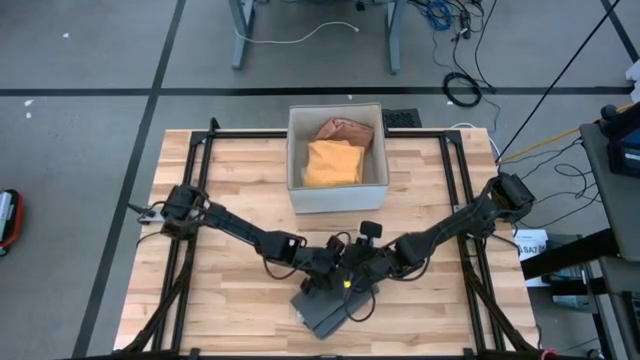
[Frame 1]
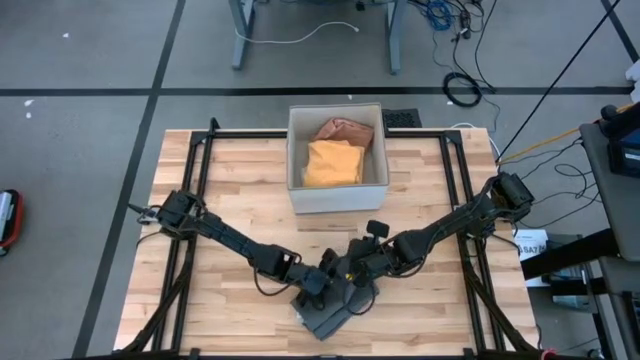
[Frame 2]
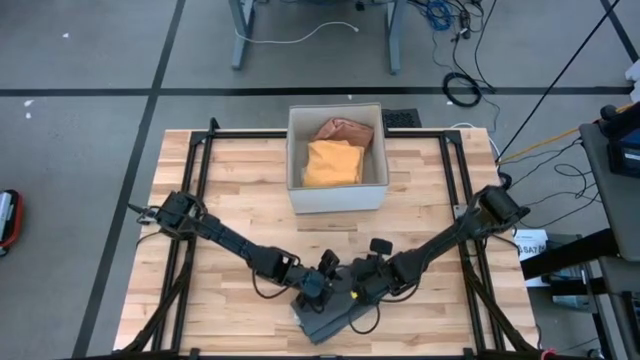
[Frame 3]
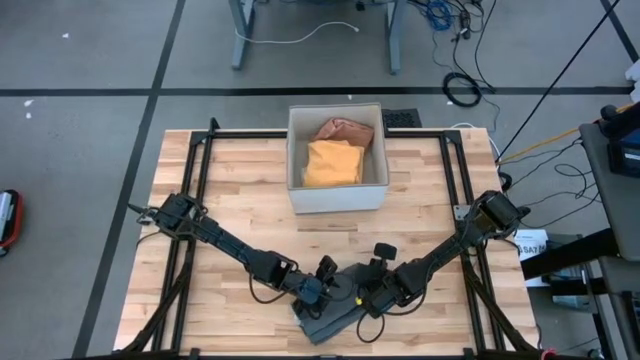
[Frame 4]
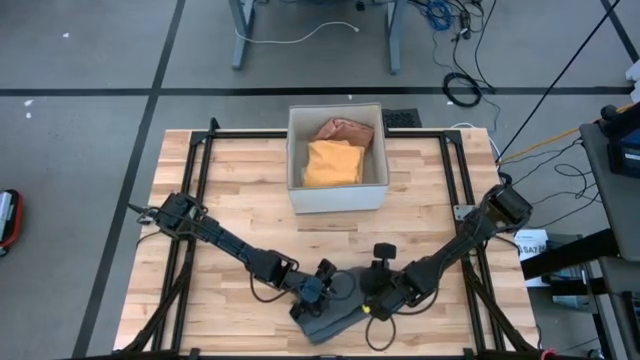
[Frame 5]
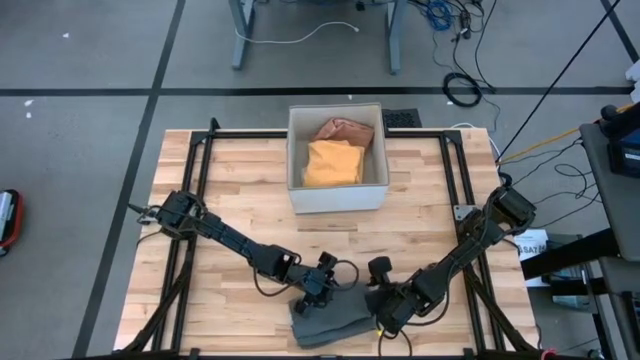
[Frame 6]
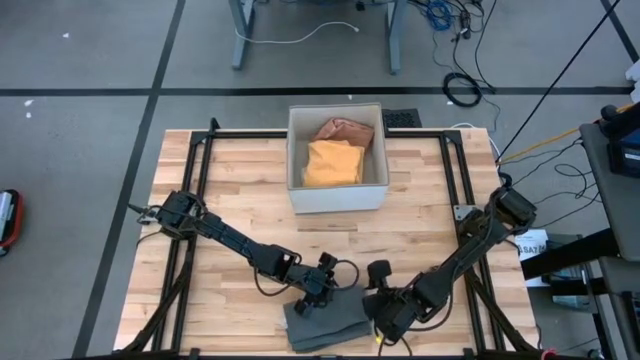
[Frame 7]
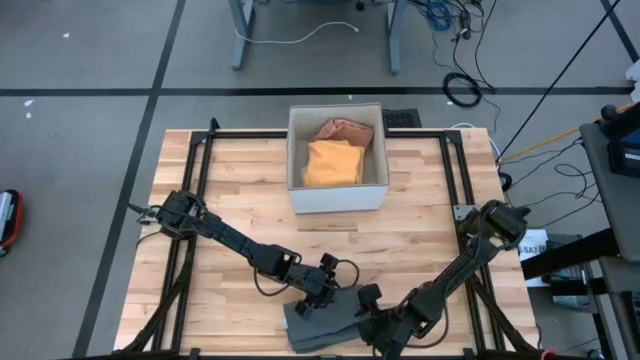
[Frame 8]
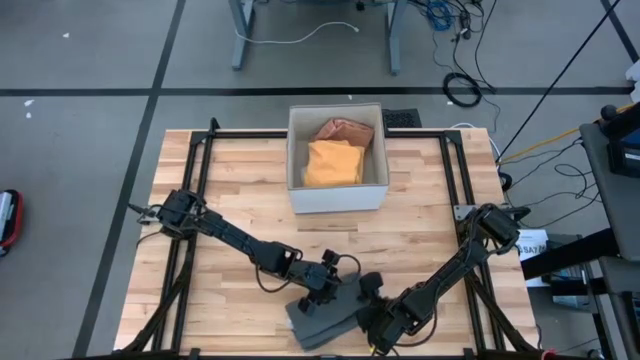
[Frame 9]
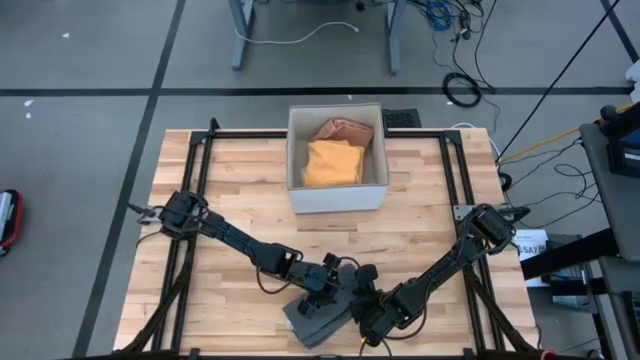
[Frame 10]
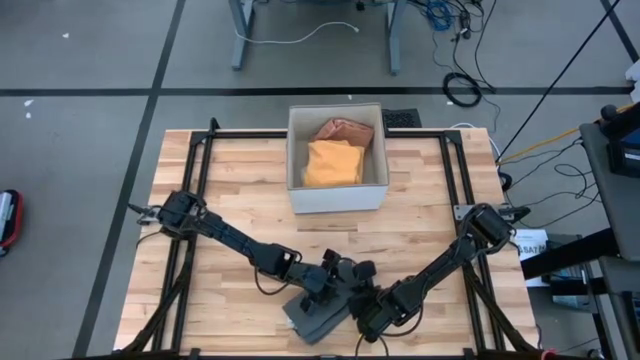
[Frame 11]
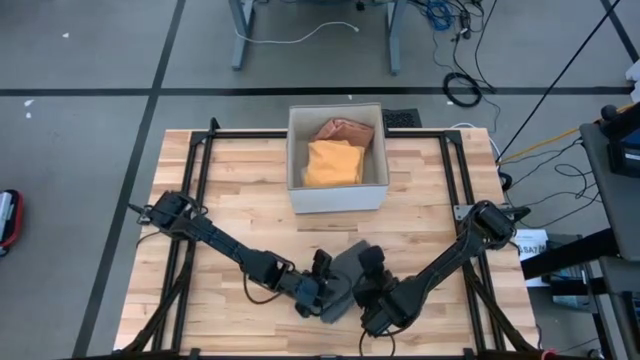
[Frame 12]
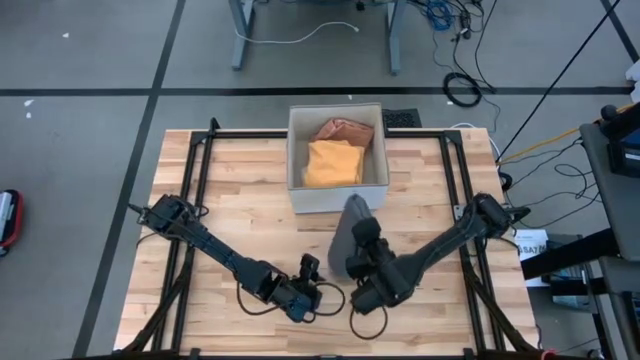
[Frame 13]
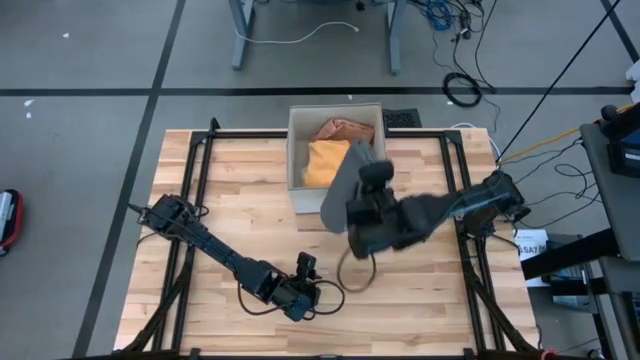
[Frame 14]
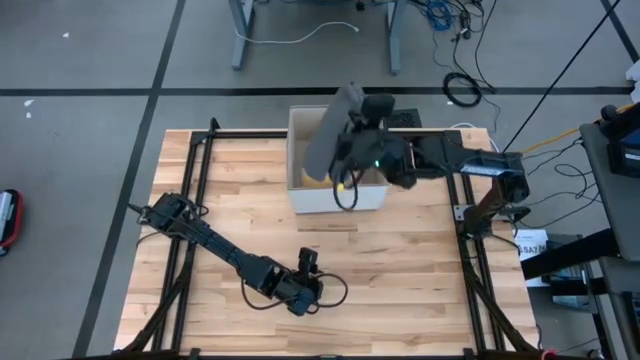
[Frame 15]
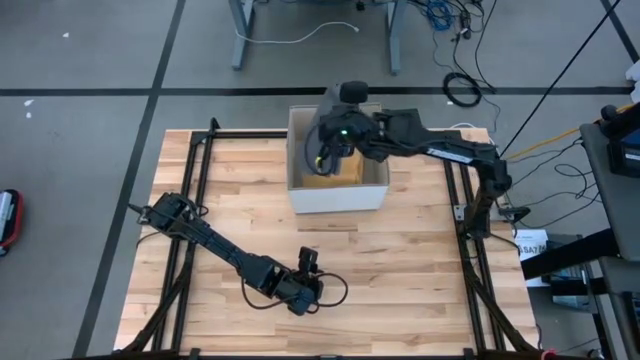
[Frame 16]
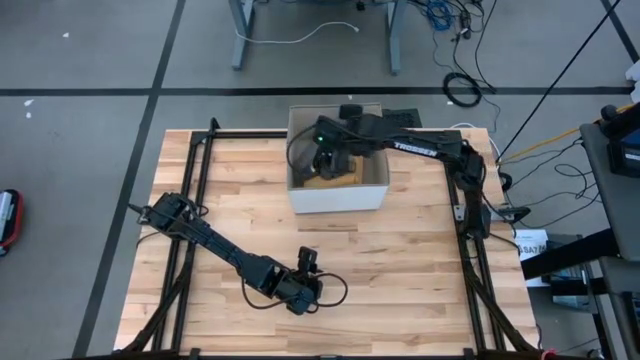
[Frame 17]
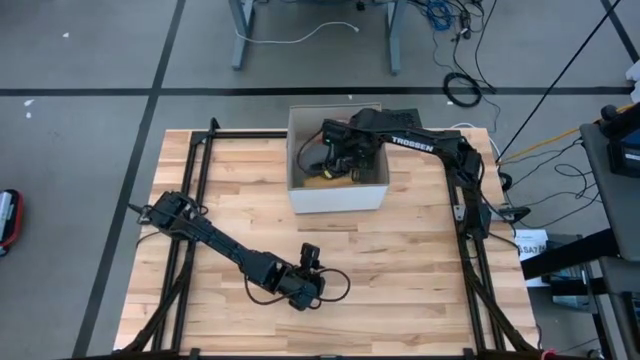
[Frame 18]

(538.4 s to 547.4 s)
Task: Fold towel
Put the folded gray towel into the laundry bin

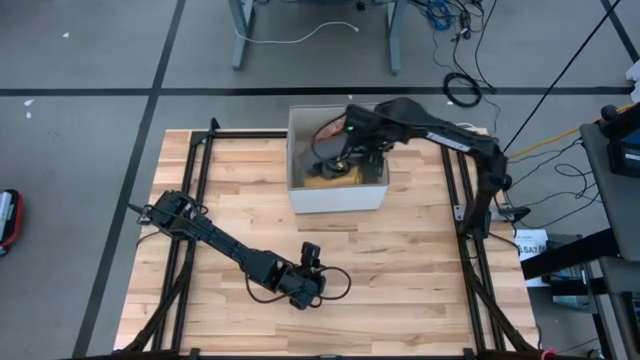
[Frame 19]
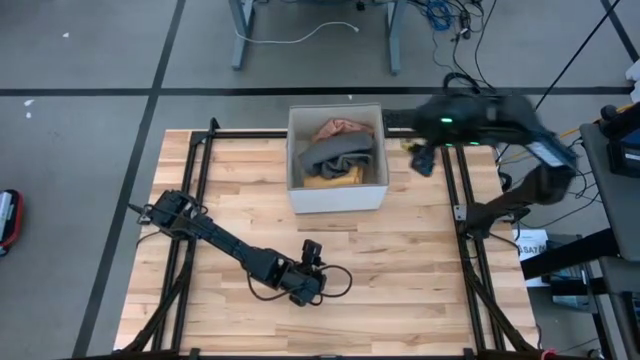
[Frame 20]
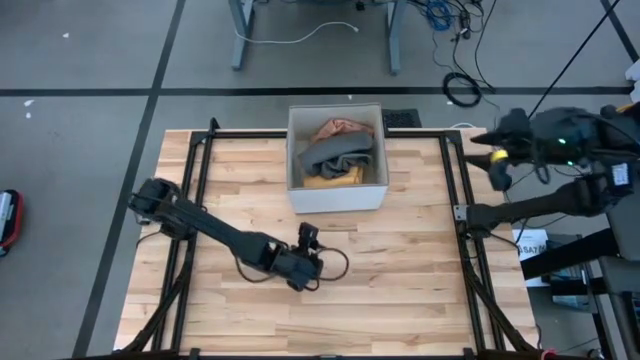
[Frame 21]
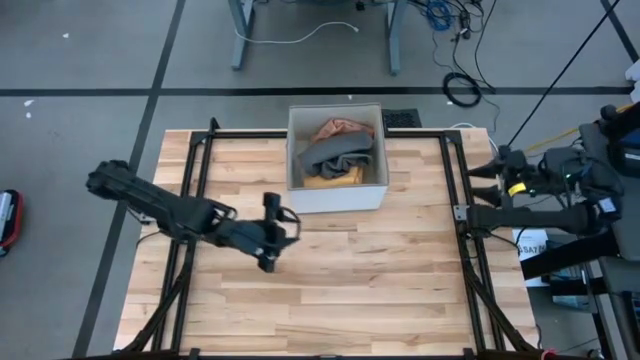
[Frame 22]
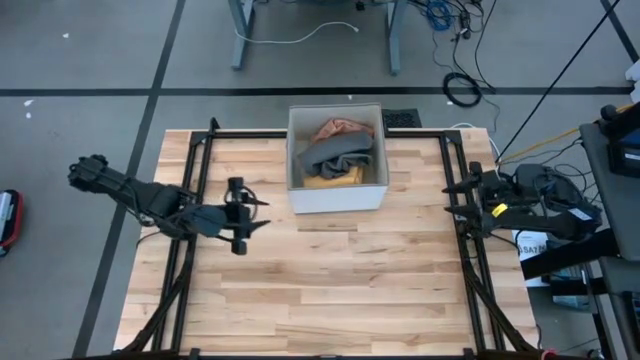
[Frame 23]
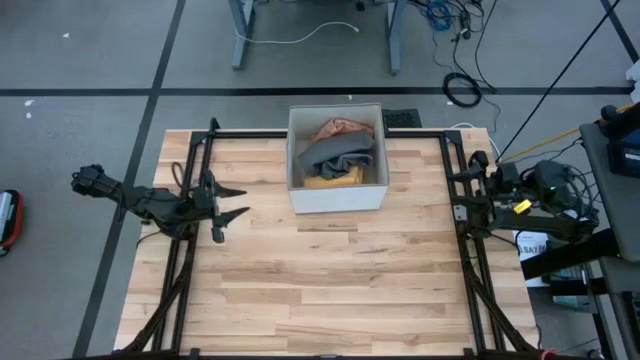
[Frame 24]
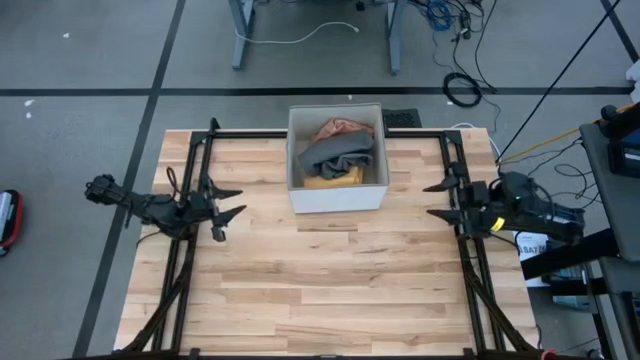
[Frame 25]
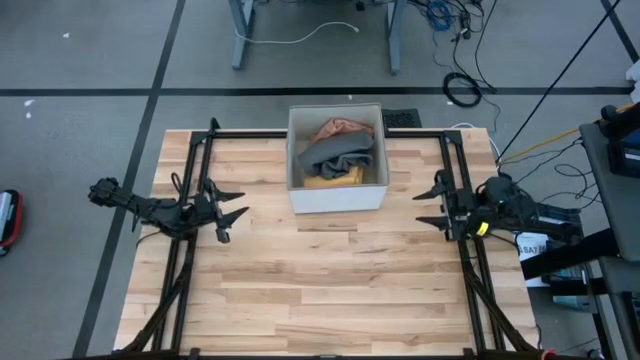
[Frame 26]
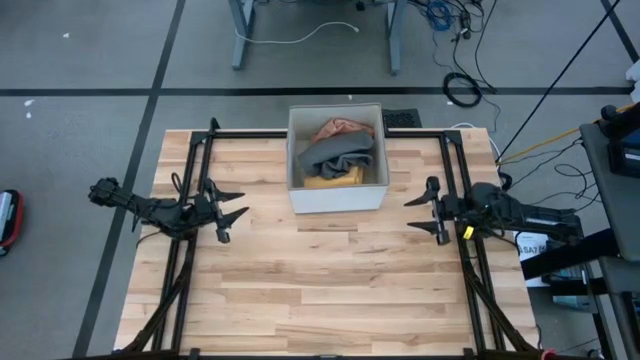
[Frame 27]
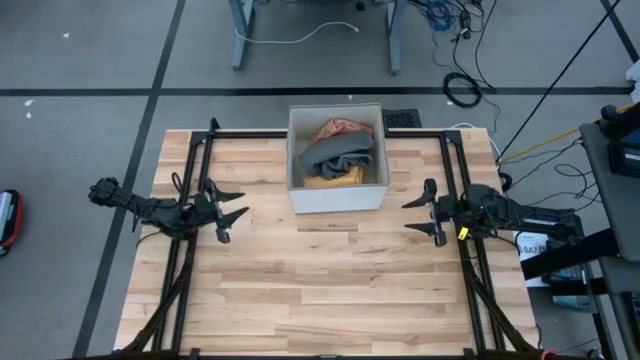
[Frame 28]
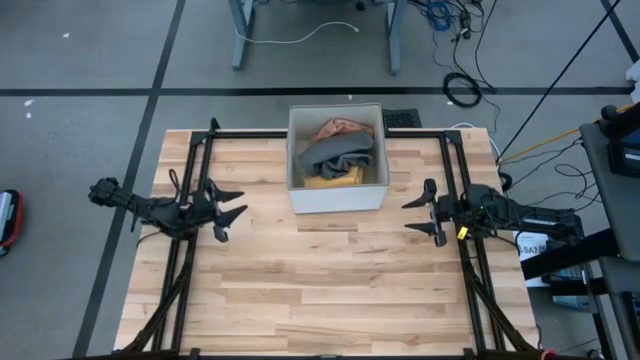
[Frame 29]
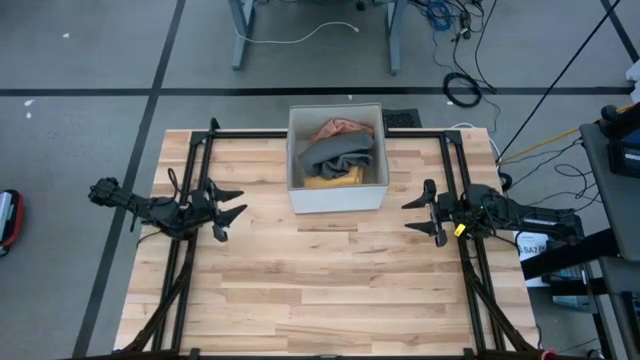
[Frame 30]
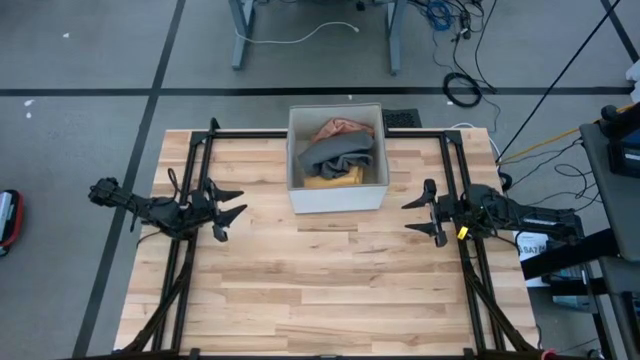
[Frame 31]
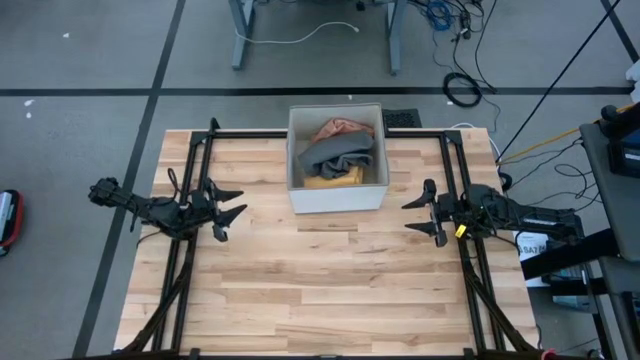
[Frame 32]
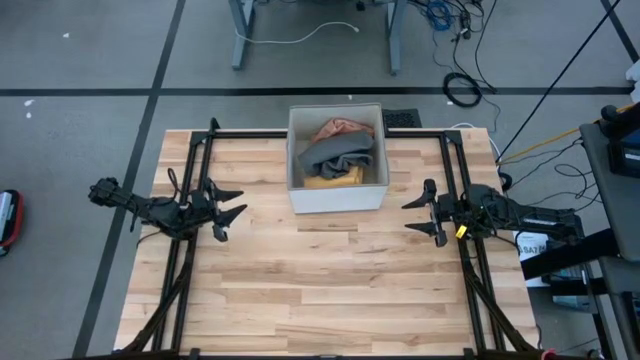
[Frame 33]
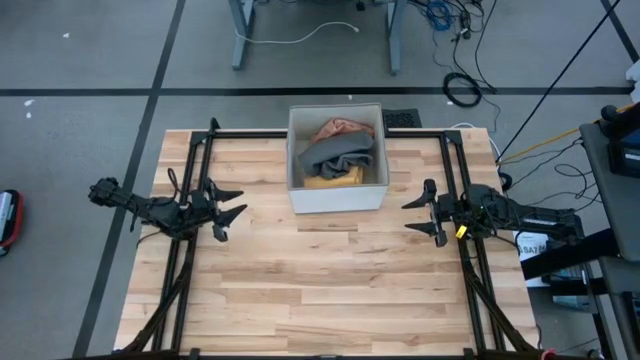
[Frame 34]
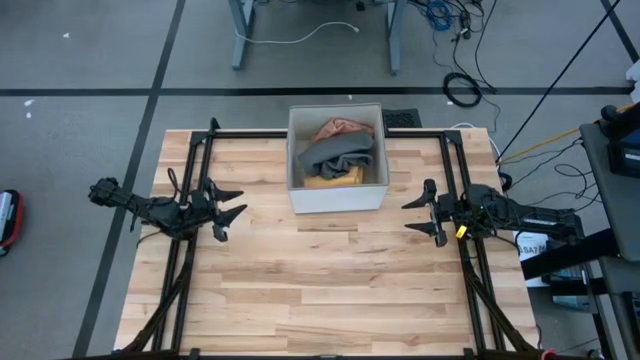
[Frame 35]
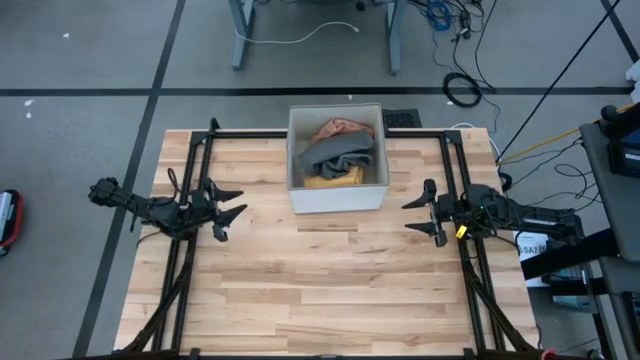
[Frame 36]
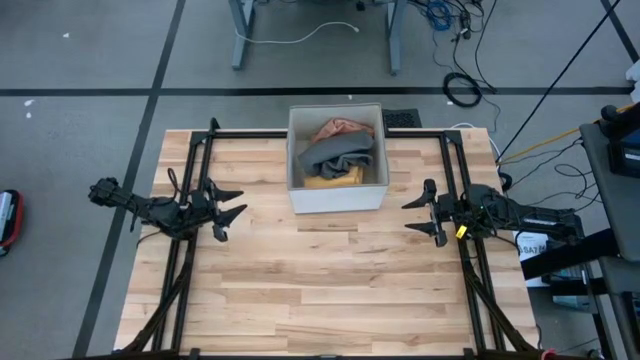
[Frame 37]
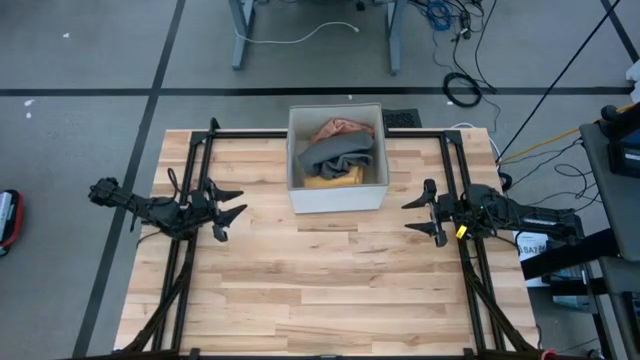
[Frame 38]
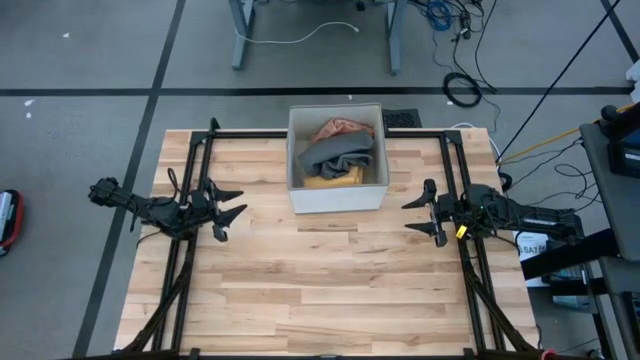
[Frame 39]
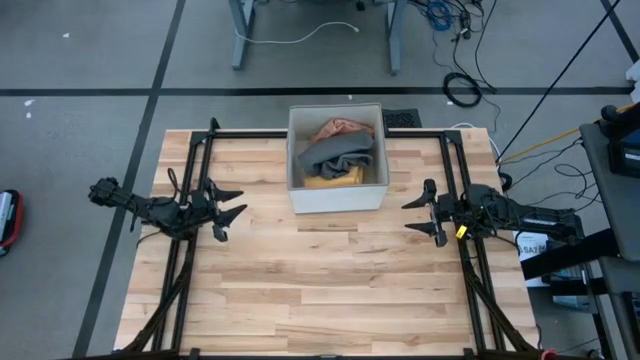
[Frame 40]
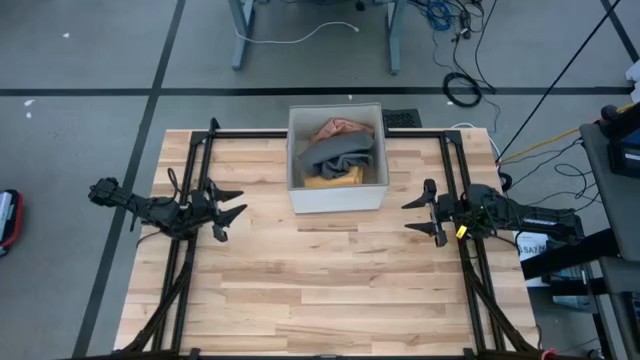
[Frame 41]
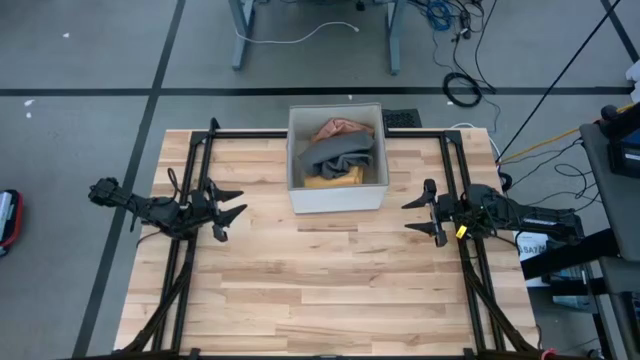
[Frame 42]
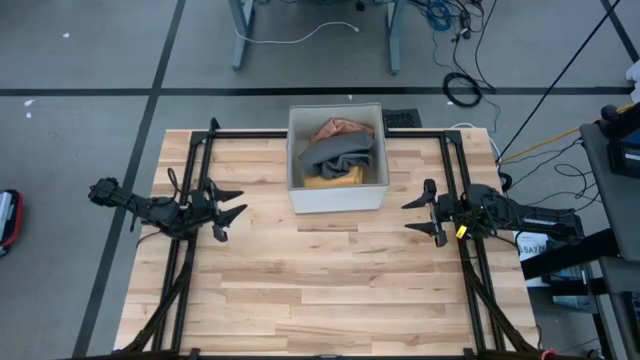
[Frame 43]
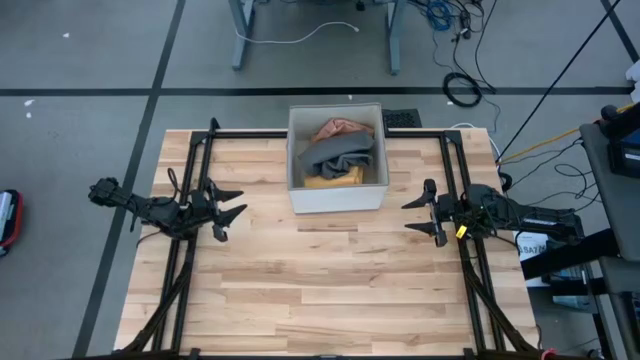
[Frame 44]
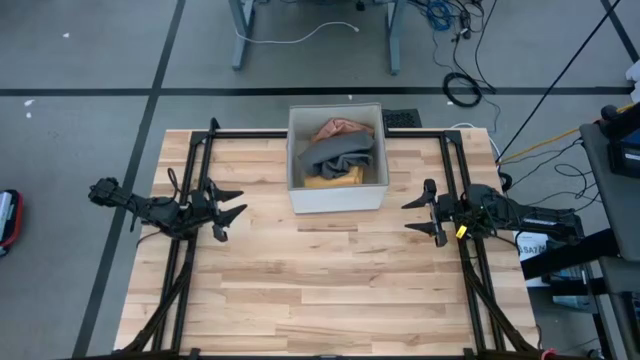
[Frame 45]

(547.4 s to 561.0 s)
Return to Home Position
